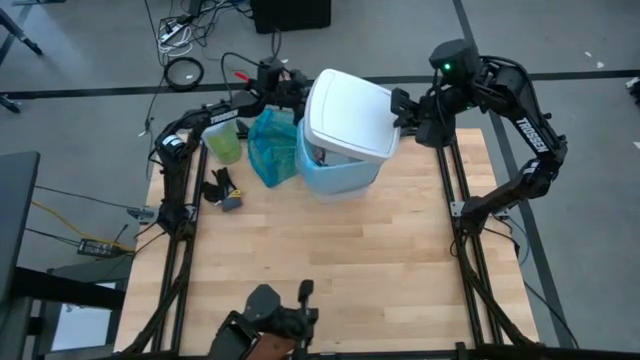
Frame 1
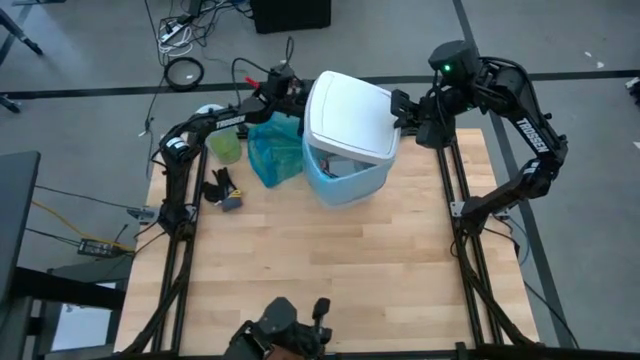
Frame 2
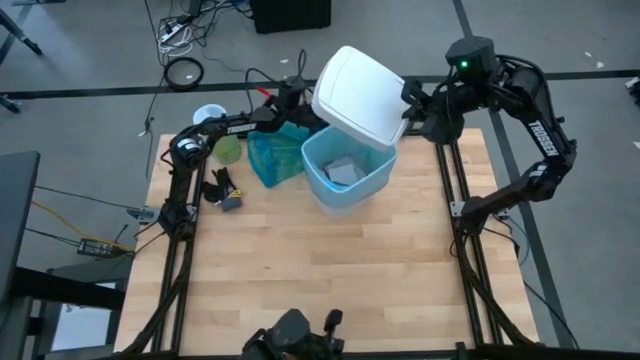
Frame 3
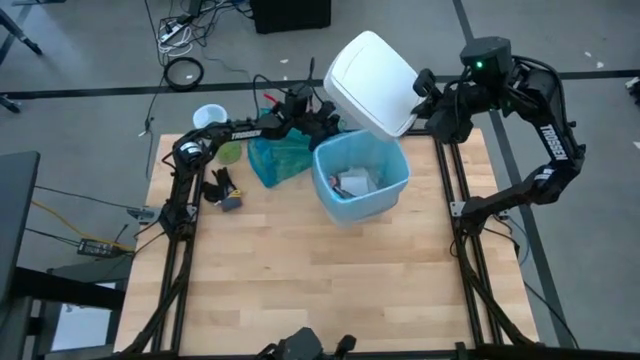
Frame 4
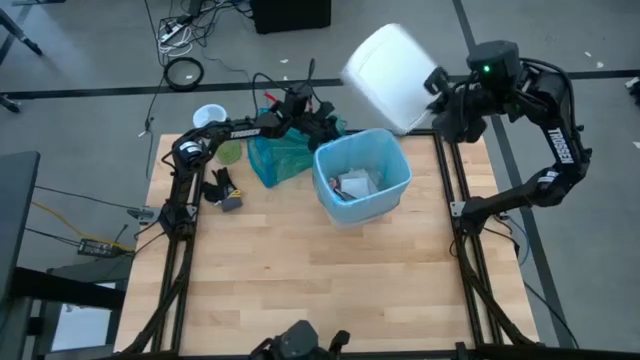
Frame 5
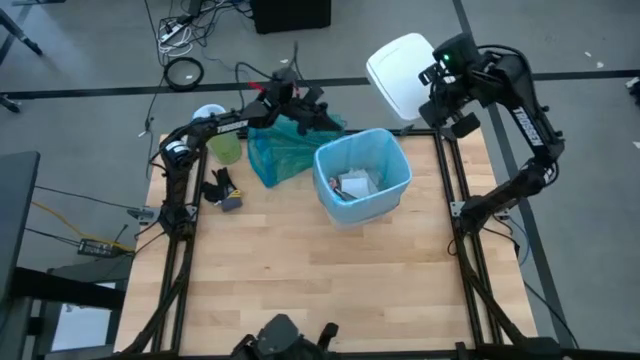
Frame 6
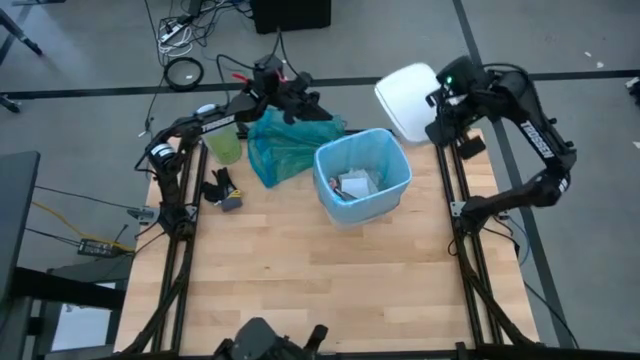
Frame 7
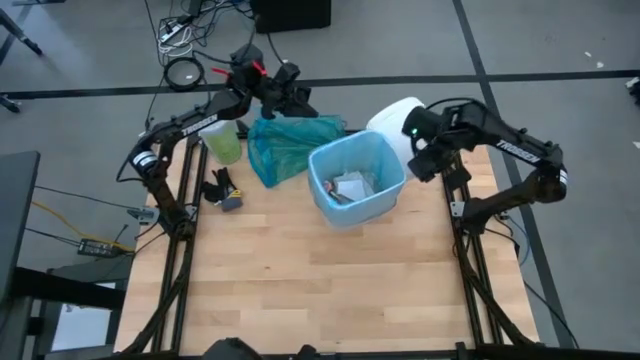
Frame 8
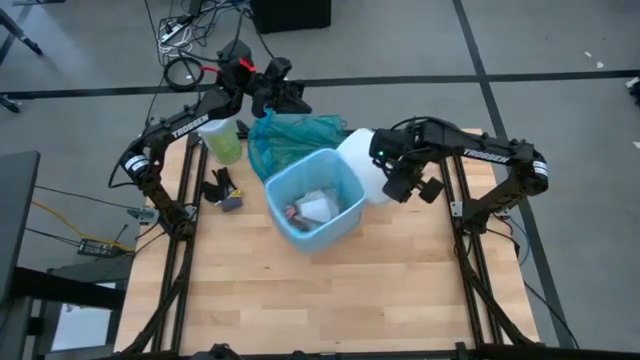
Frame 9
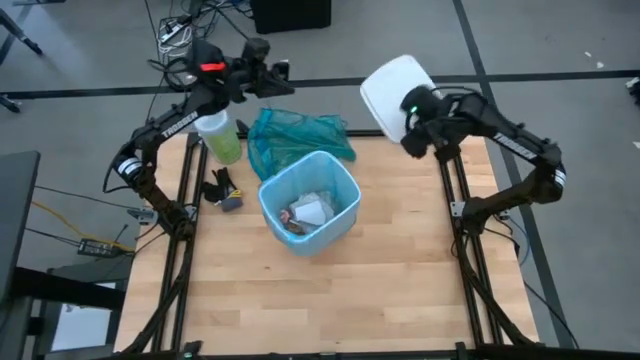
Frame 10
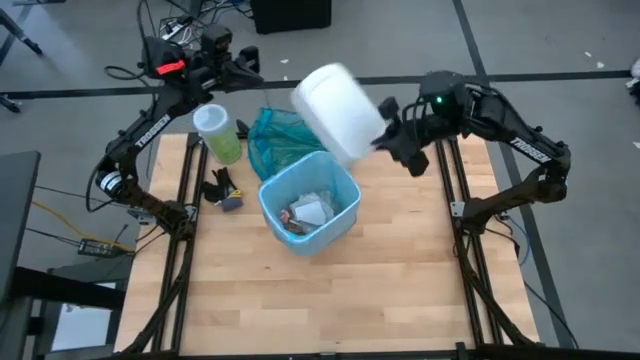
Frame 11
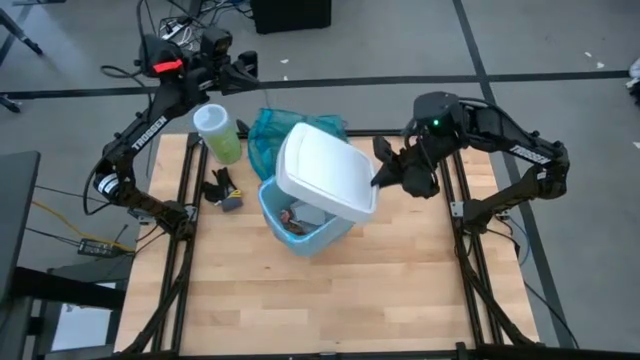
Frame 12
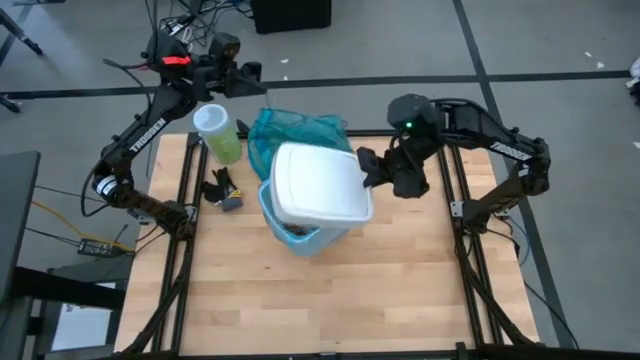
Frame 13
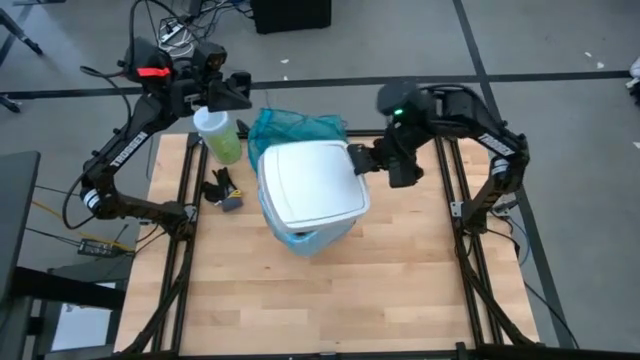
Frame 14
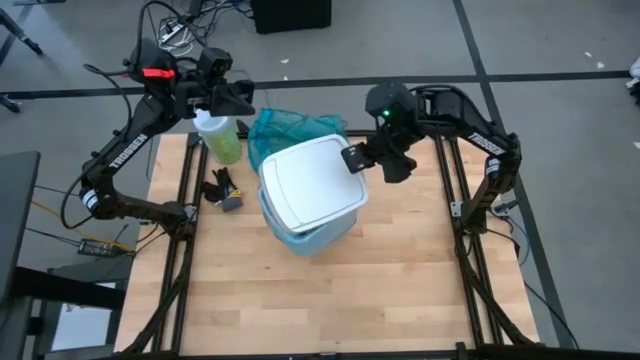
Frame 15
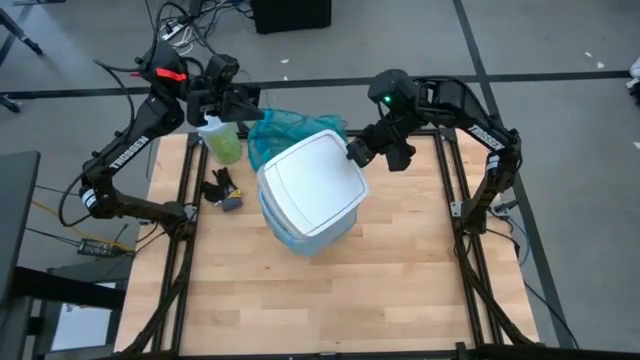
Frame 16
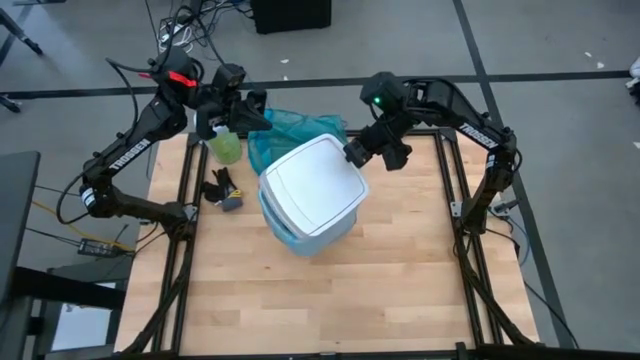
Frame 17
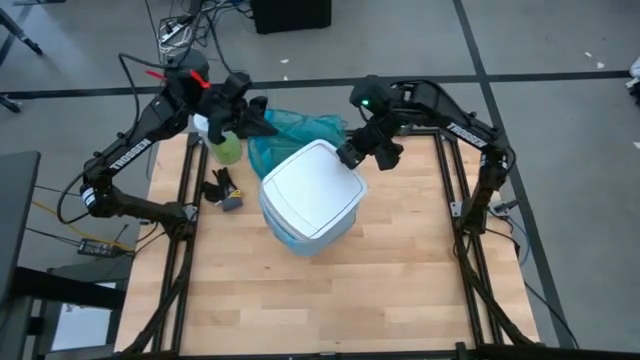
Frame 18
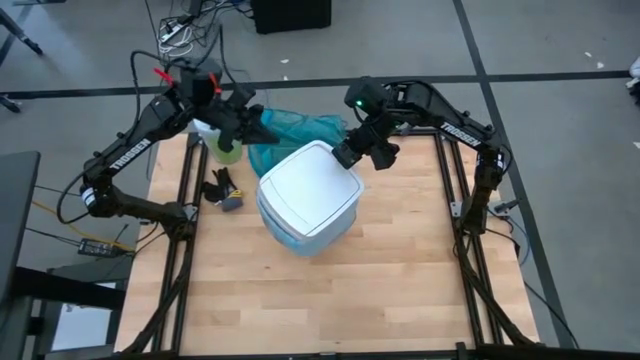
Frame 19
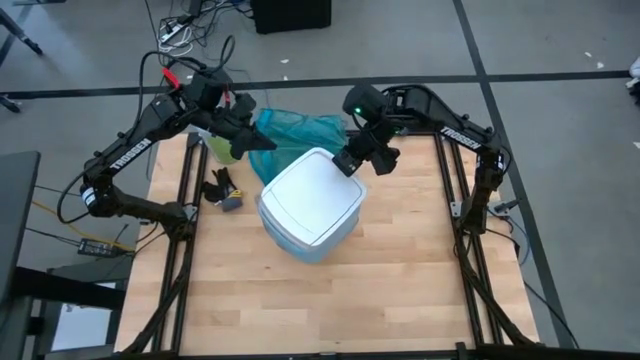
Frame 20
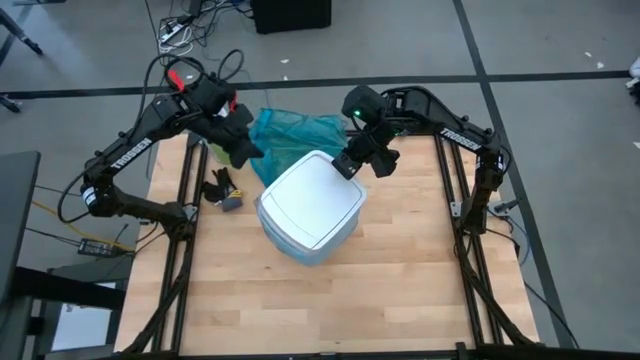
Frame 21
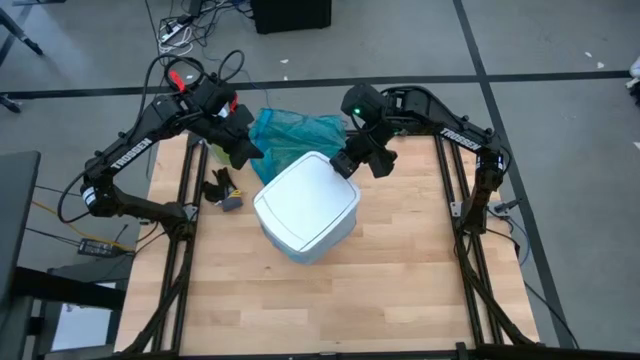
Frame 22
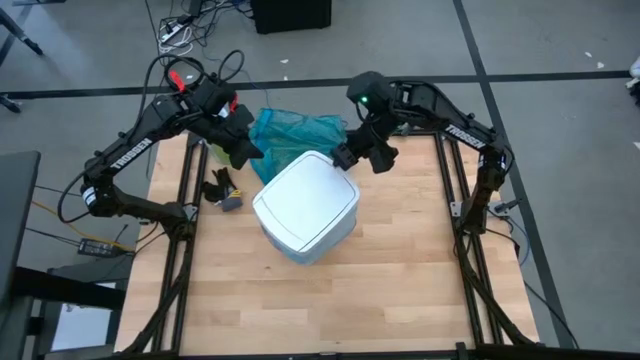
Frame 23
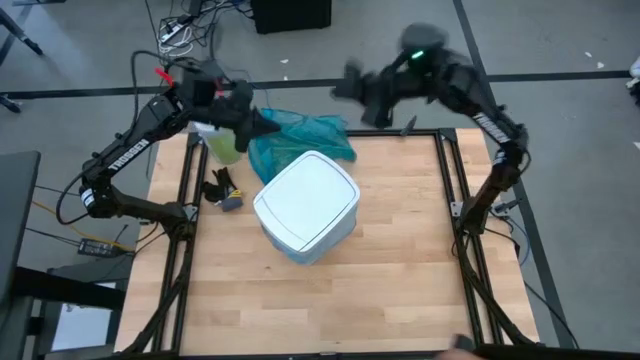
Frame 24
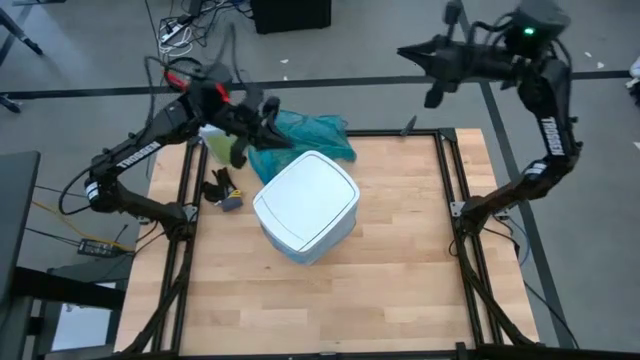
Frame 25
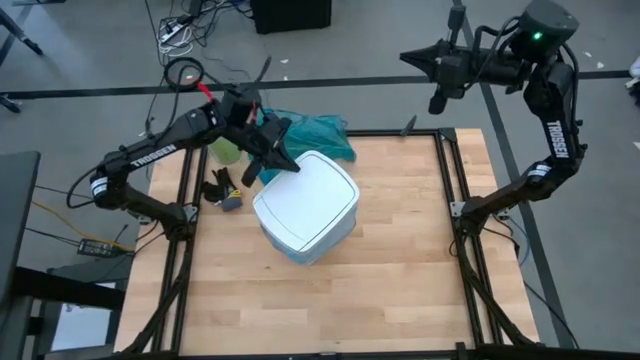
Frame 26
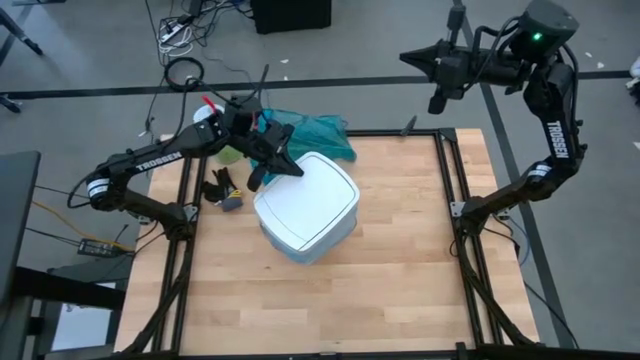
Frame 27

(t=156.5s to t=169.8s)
Task: place trash/remove bag and relplace
Put the white trash lid on the white trash bin

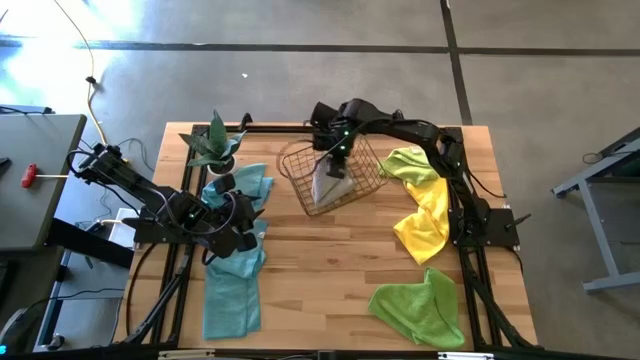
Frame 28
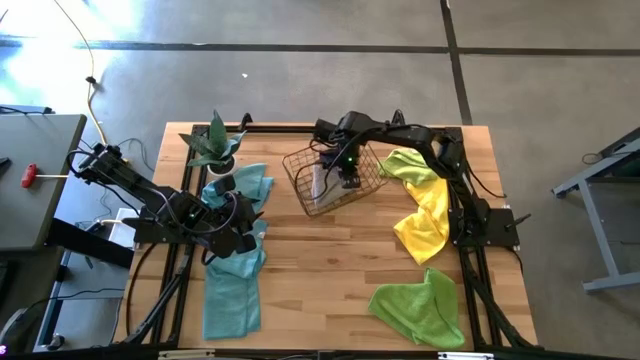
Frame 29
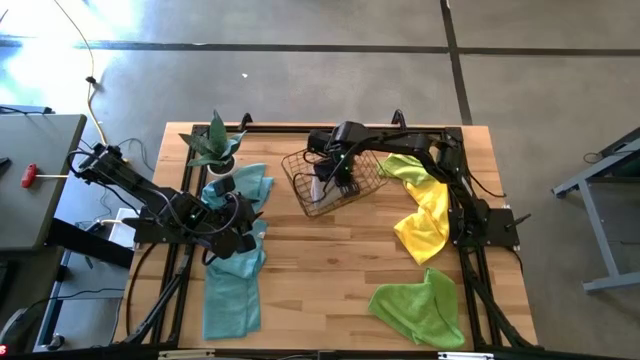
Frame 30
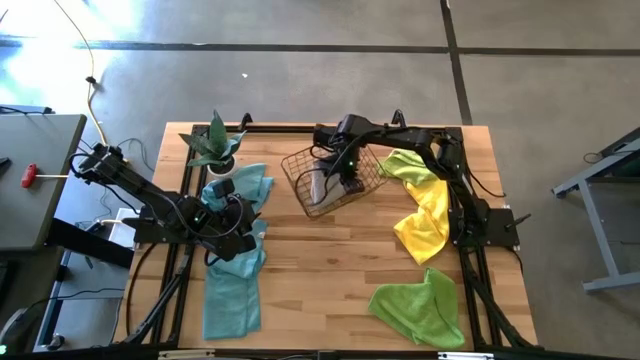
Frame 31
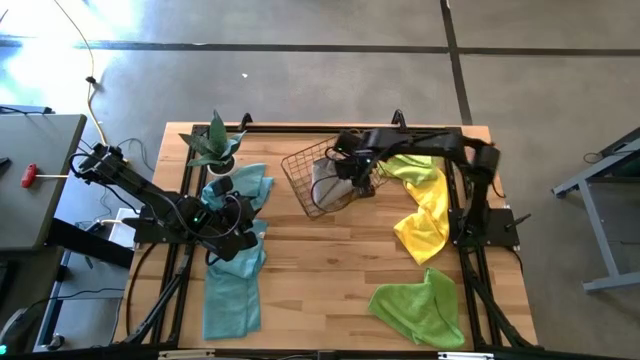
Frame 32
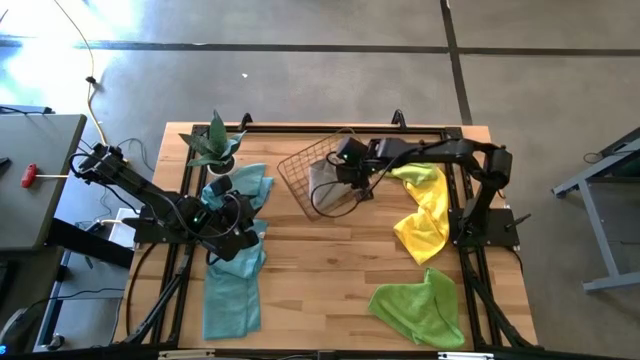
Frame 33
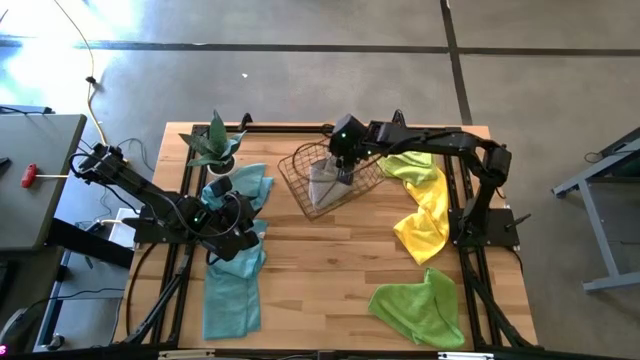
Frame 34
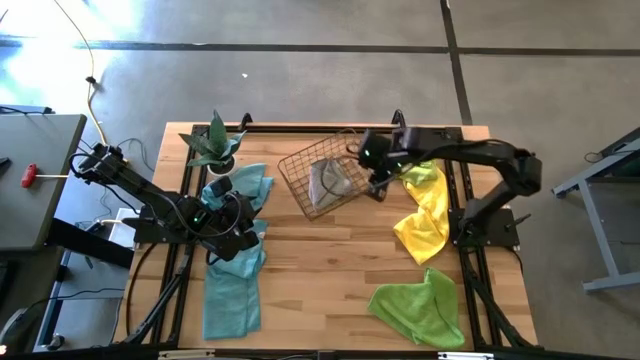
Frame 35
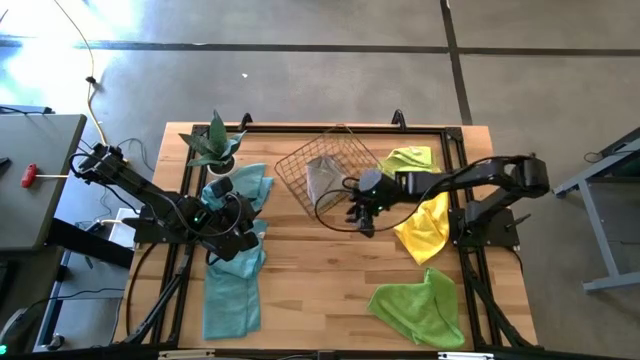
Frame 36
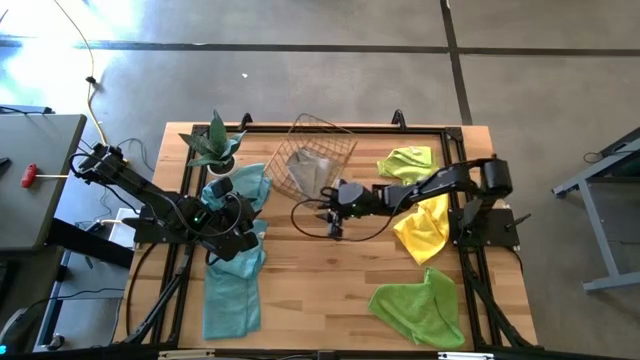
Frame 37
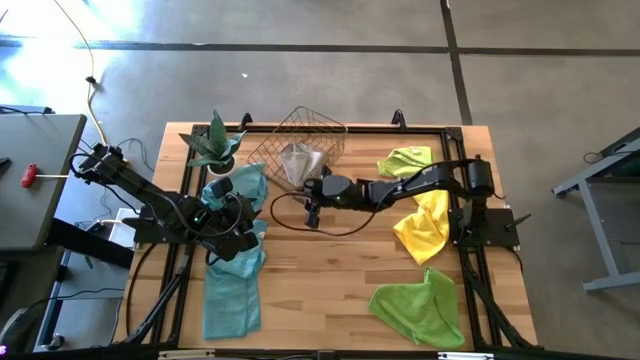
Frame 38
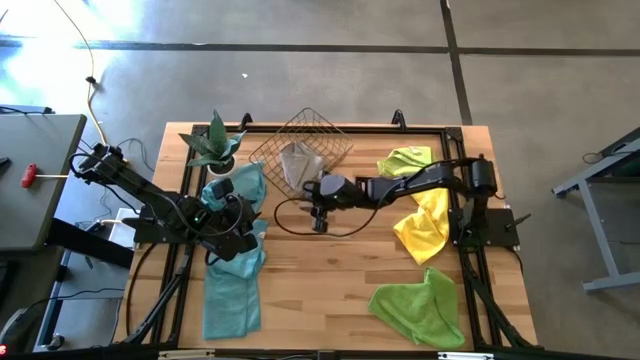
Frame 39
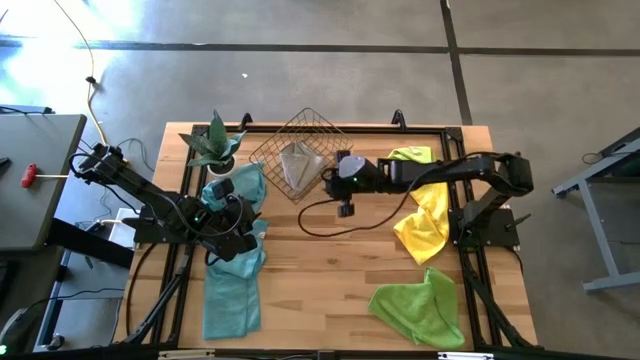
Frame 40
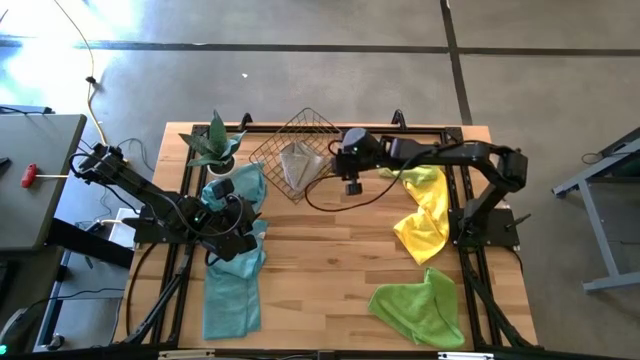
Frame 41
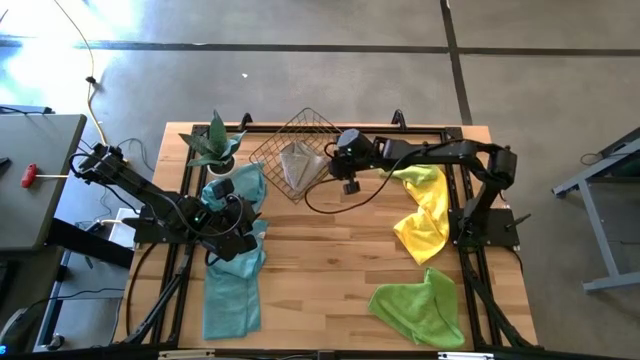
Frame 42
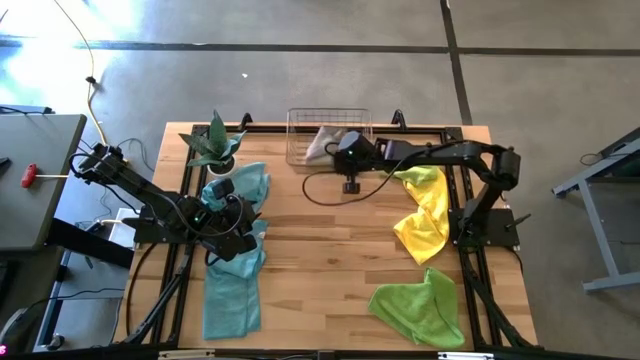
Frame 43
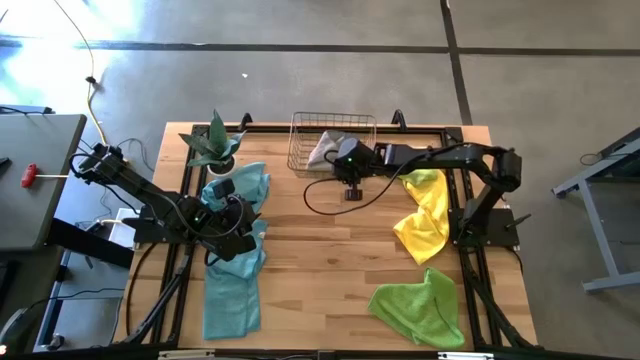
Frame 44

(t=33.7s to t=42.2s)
Task: Fold microfiber towels
Adjust the wire basket
